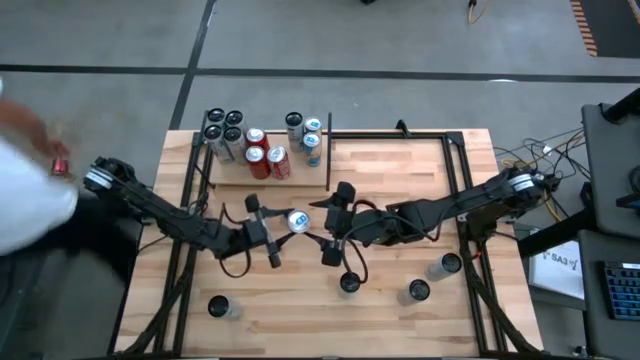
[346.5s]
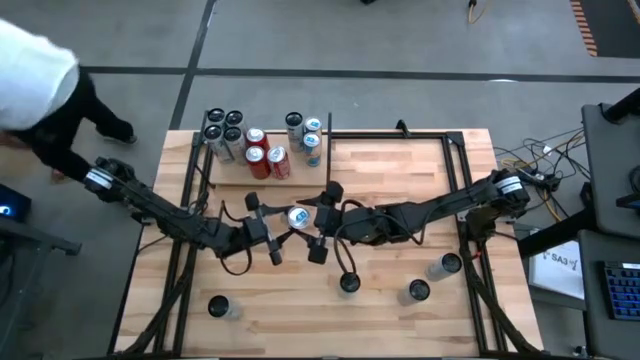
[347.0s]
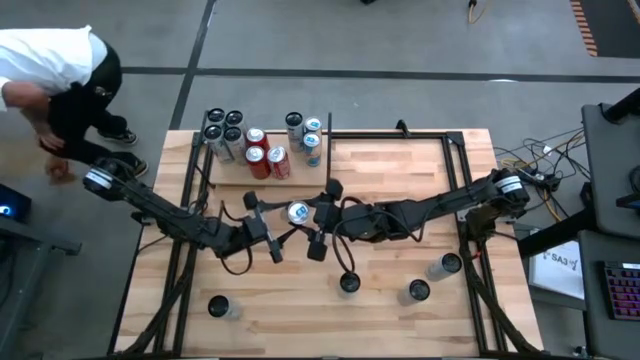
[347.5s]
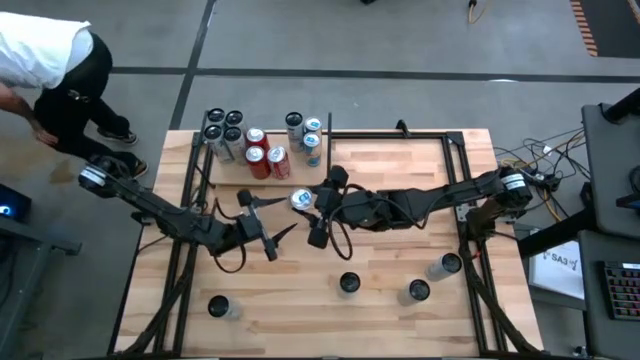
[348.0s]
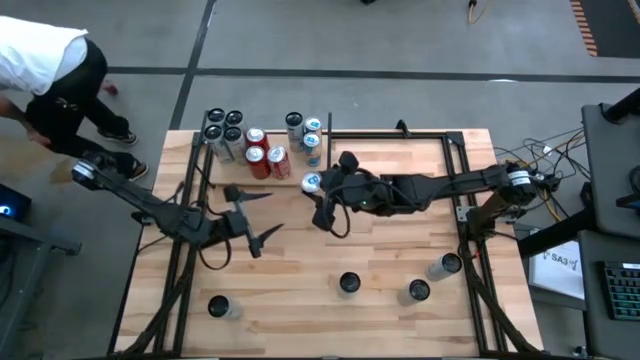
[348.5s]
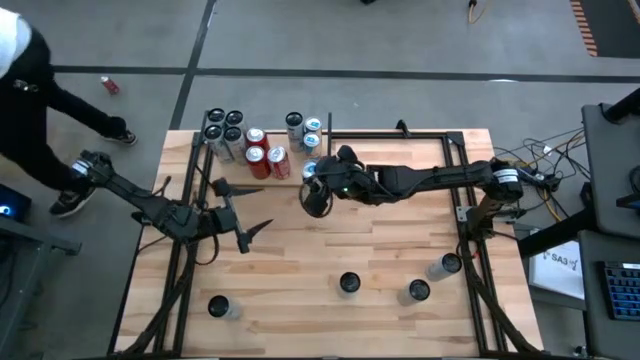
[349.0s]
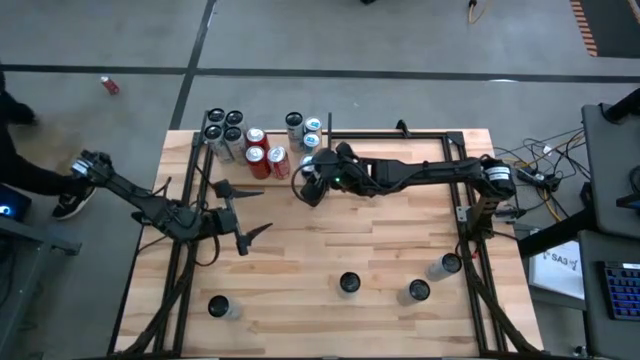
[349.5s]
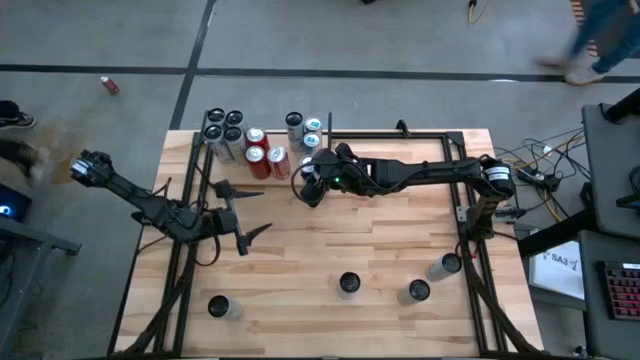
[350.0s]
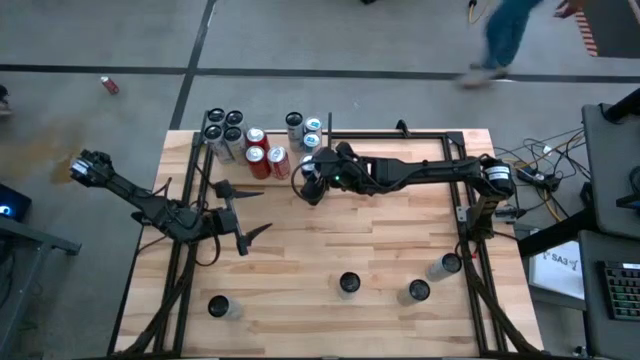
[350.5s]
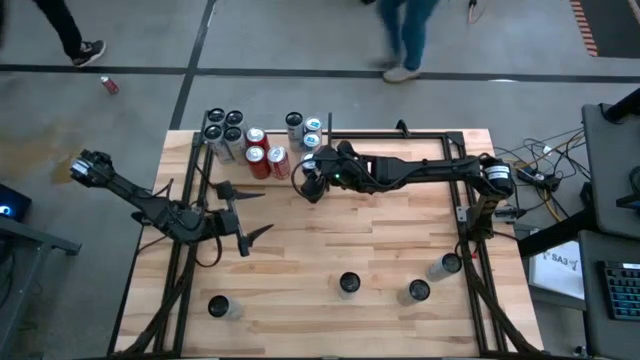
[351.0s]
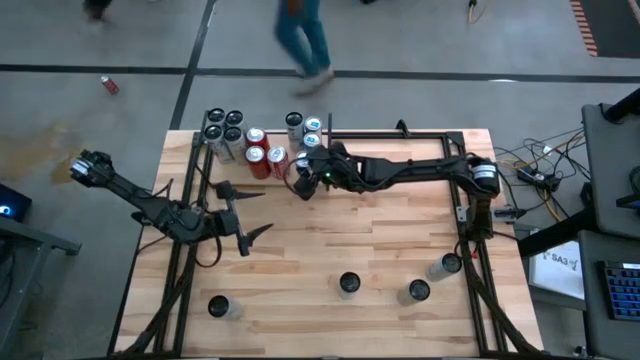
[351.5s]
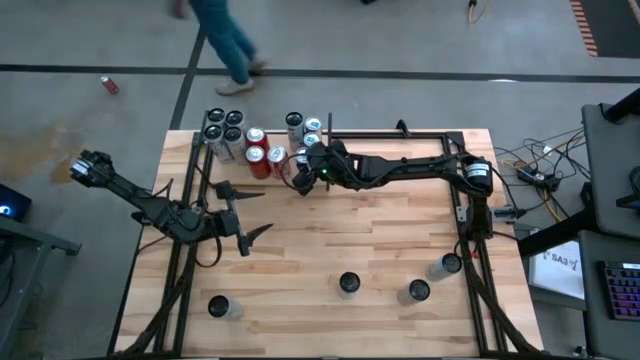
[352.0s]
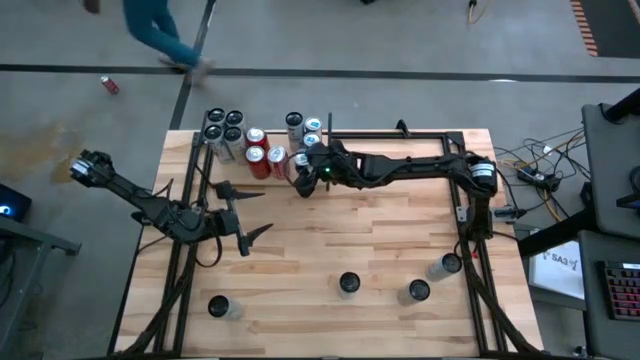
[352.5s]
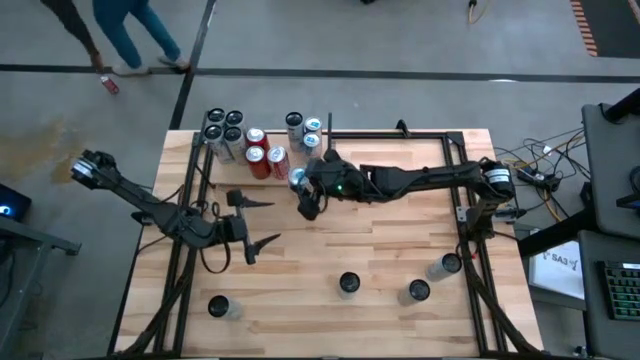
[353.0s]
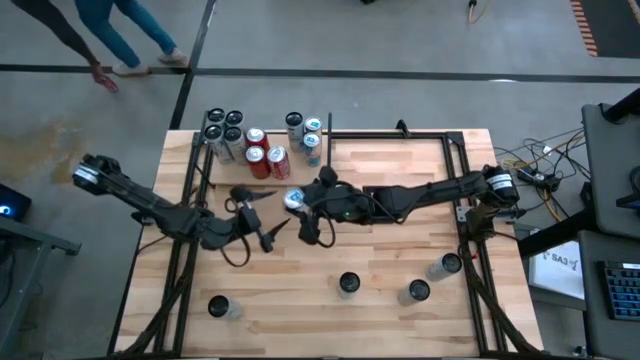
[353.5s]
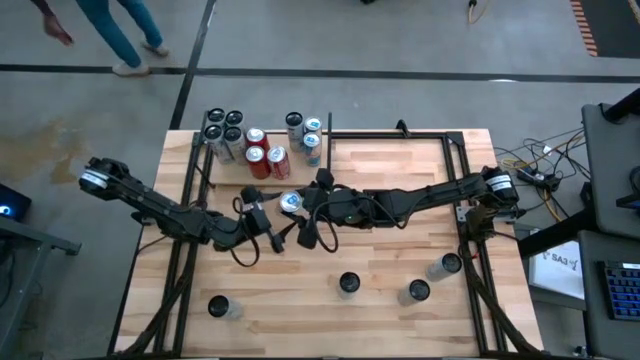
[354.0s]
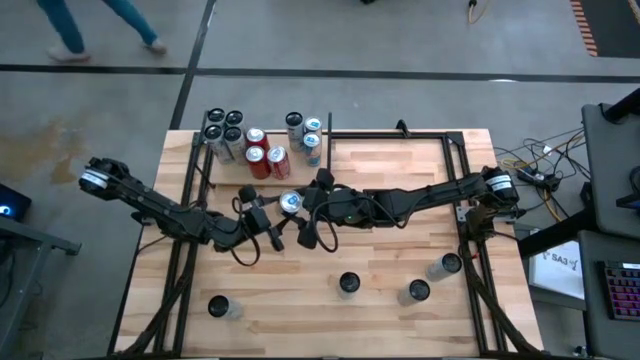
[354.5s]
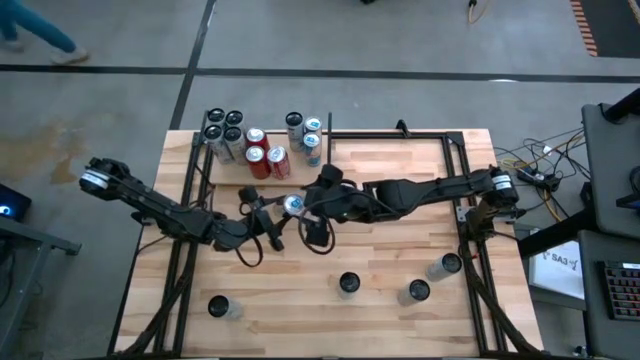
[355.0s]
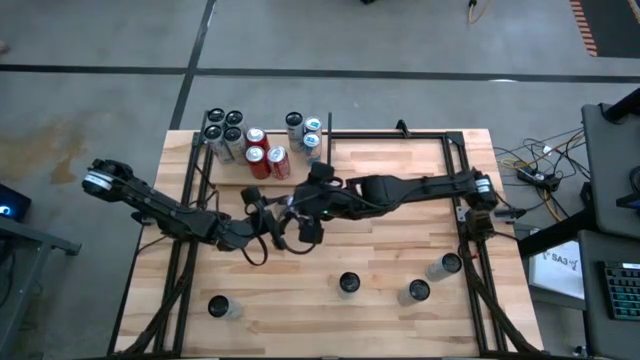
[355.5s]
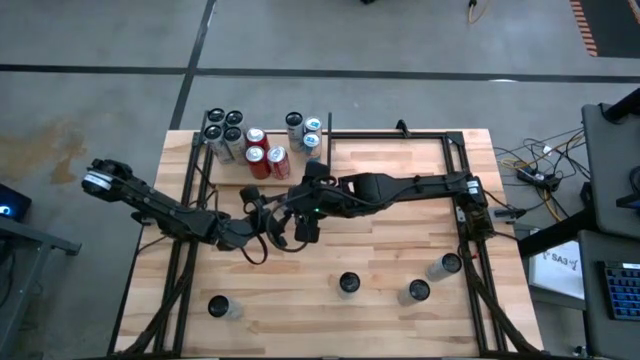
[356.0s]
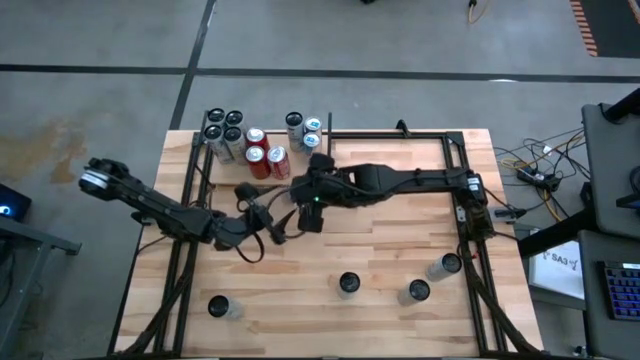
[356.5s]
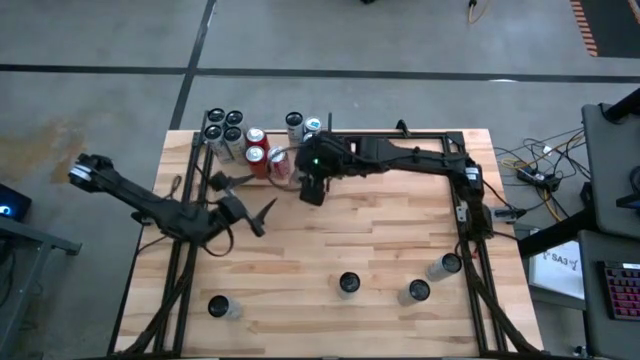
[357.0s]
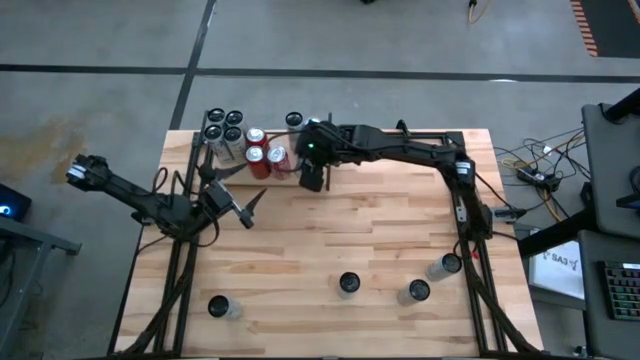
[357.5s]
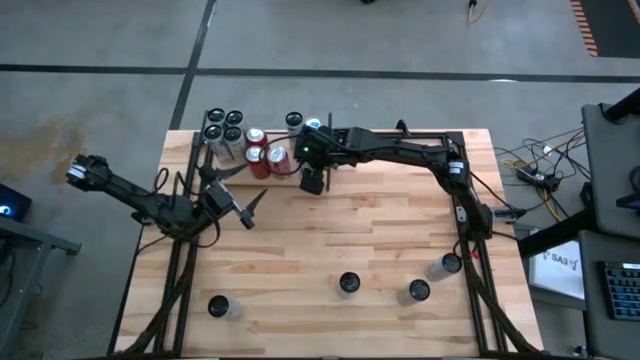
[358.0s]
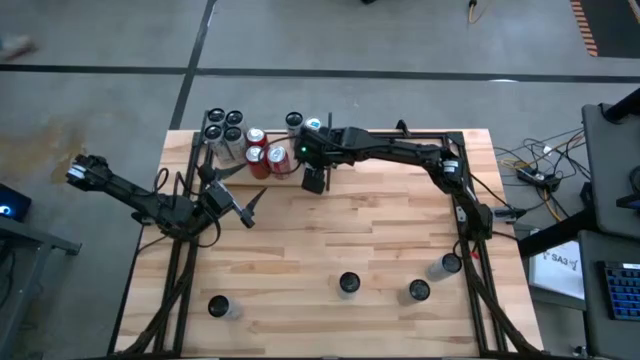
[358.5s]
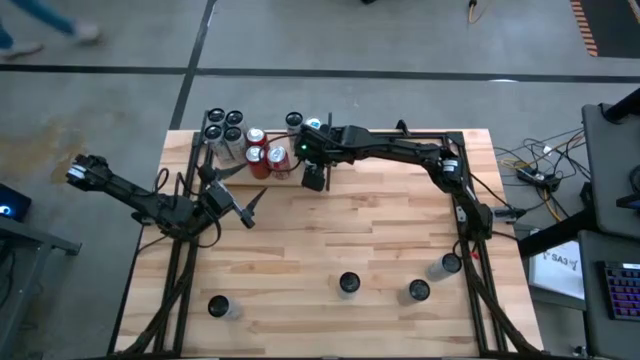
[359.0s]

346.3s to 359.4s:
Task: Place canned beverage on shelf
Put the blue and silver soda can on the shelf aligned with the other blue and silver soda cans

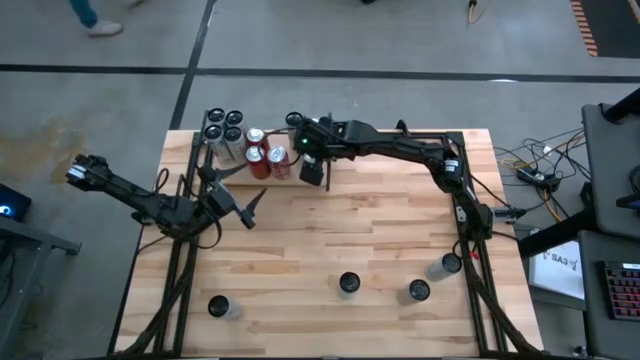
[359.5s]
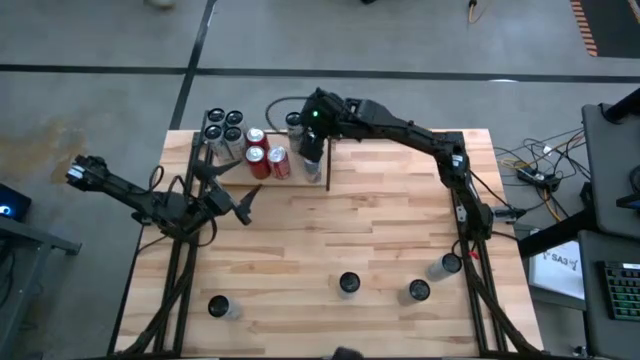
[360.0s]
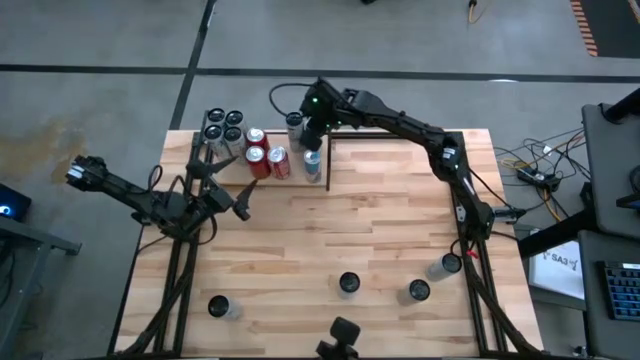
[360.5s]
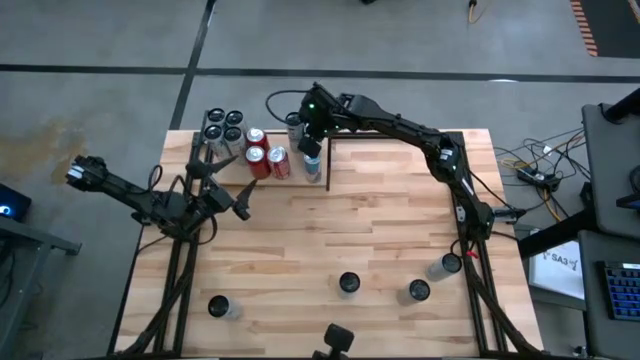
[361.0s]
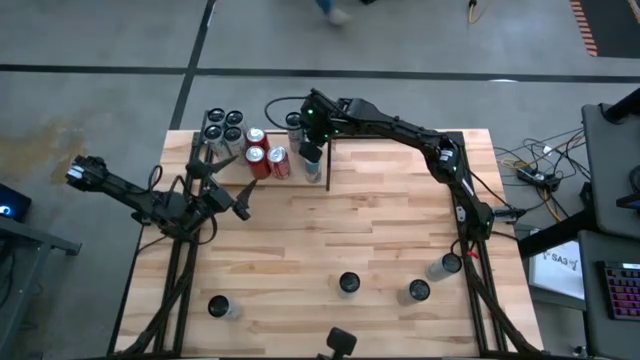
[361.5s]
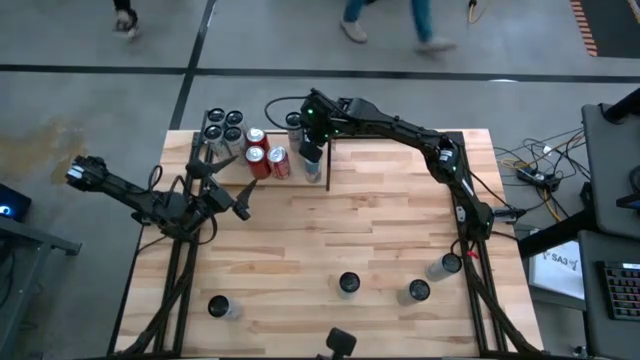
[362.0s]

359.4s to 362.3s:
Adjust the blue and gray soda can on the shelf

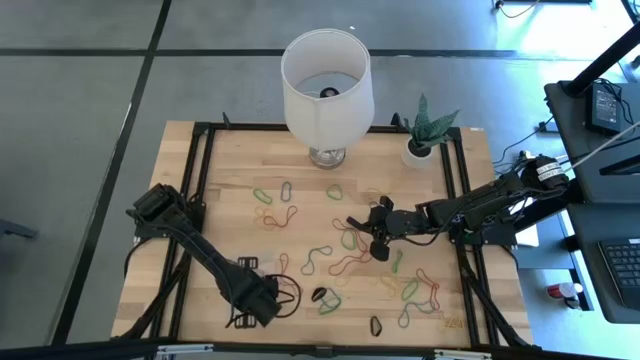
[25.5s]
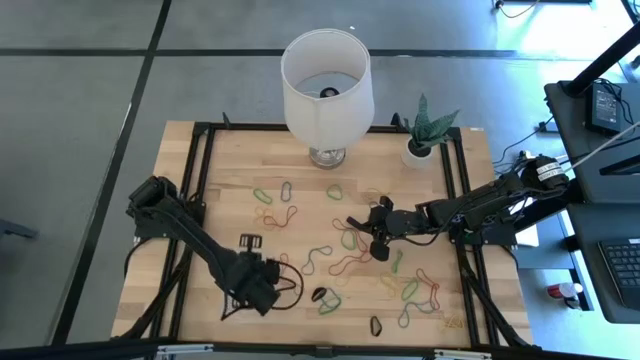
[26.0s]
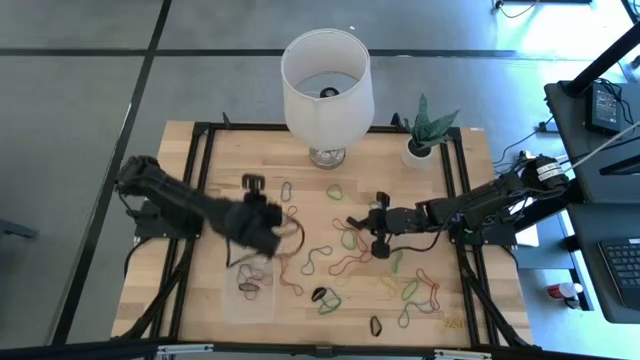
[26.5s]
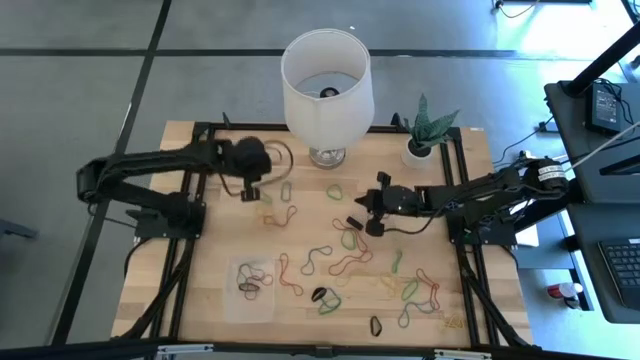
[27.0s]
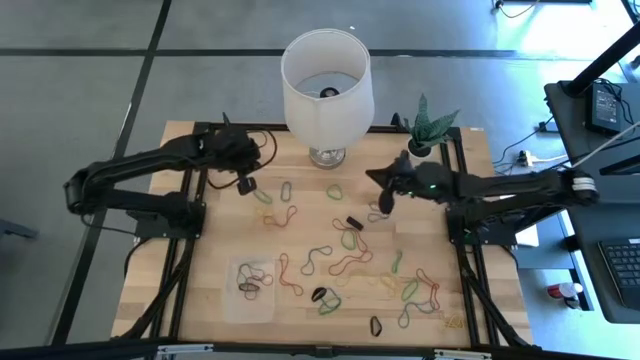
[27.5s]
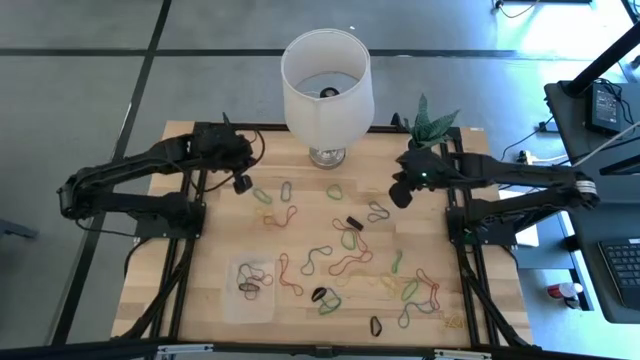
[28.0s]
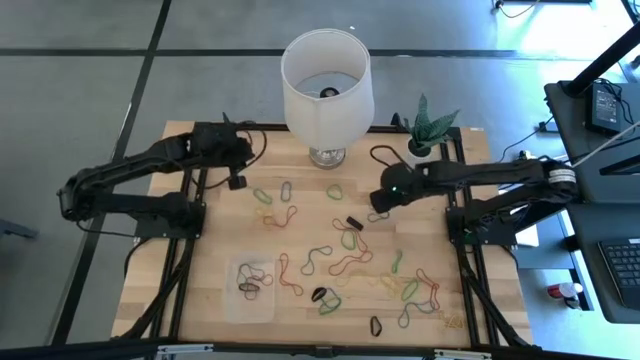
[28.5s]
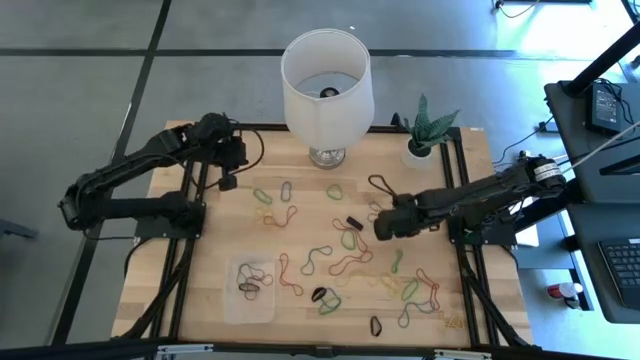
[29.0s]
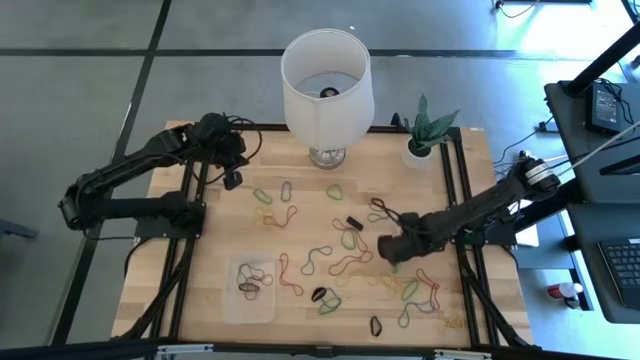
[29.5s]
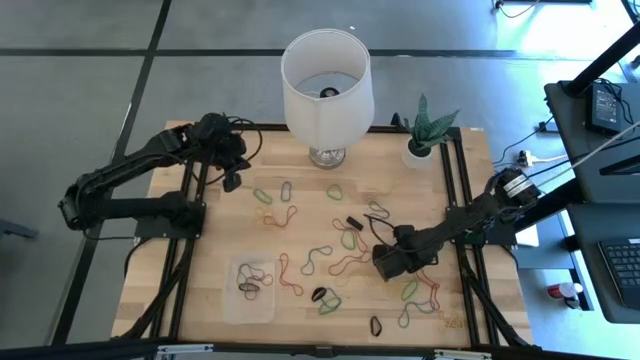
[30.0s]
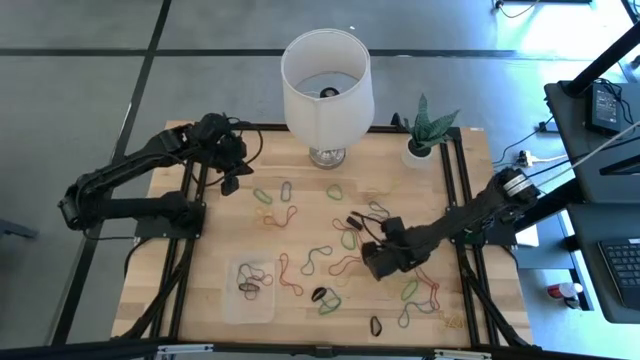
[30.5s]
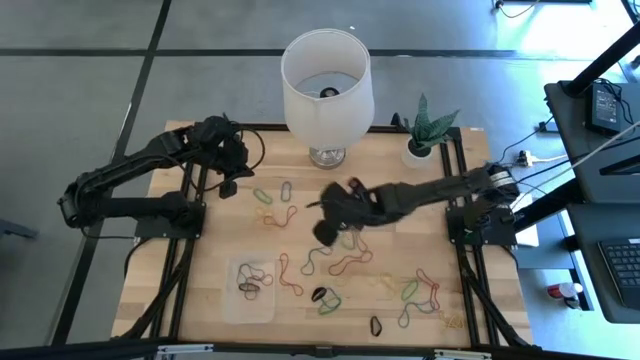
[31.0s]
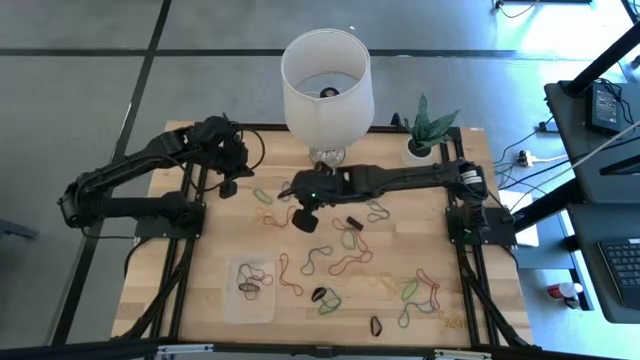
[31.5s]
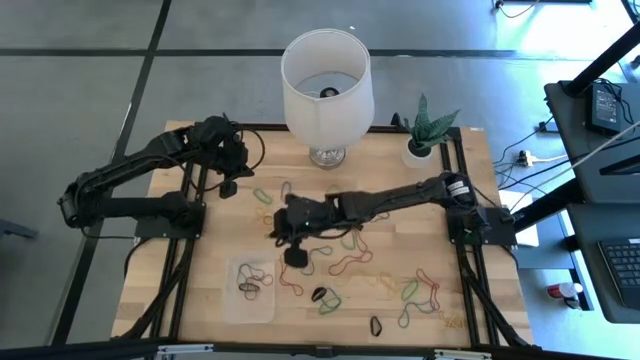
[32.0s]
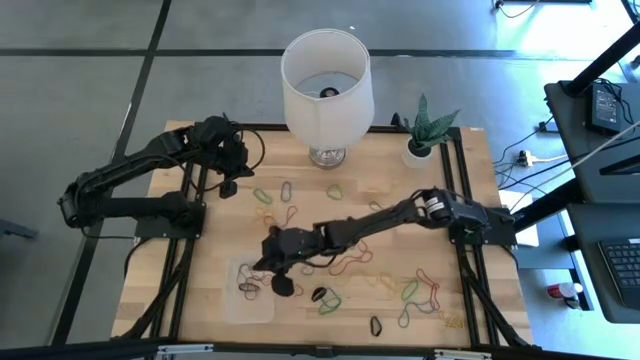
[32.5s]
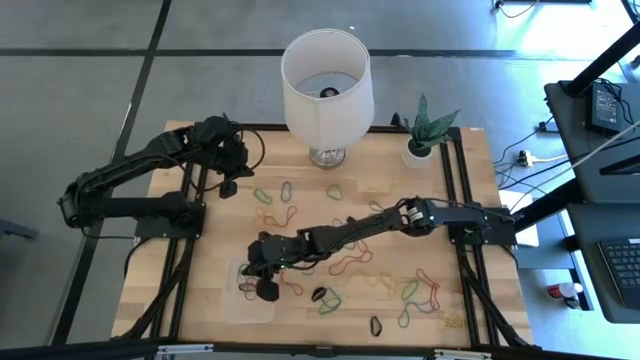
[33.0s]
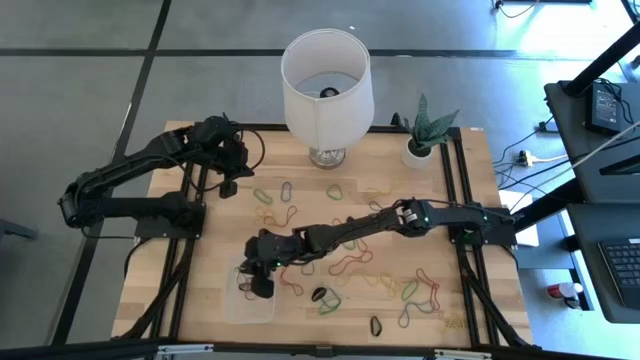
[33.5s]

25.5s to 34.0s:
Task: Pick and place rubber bands into bin
Put the green rubber band into the transparent bin
